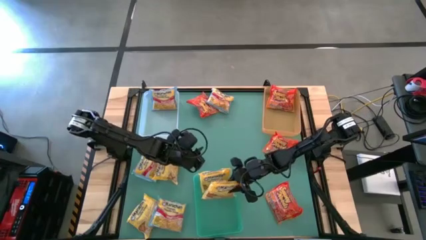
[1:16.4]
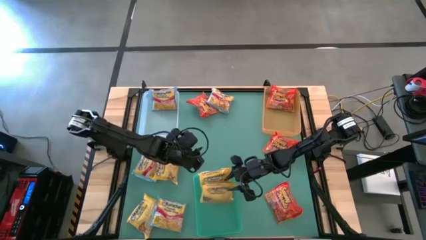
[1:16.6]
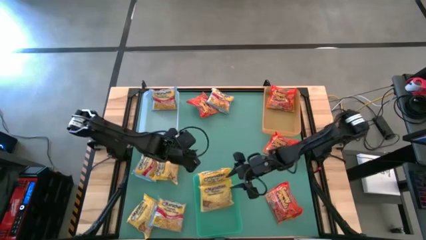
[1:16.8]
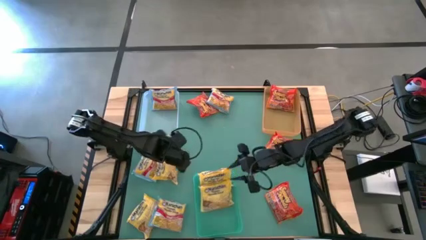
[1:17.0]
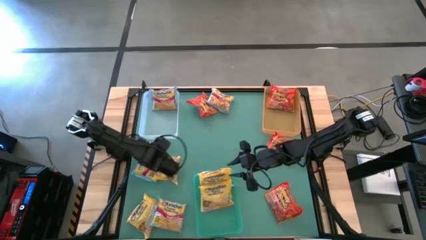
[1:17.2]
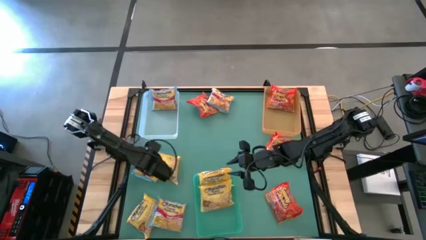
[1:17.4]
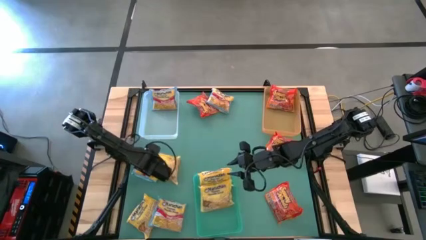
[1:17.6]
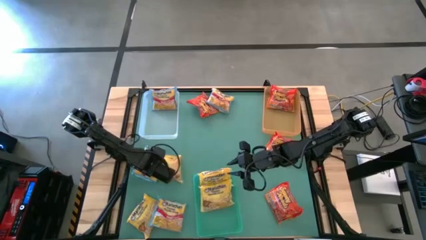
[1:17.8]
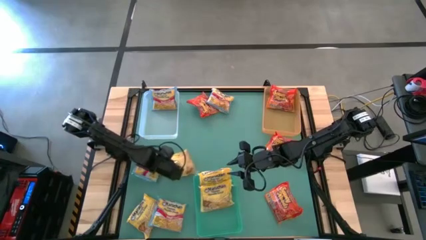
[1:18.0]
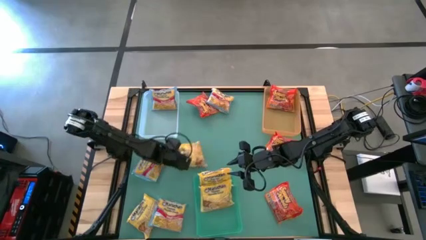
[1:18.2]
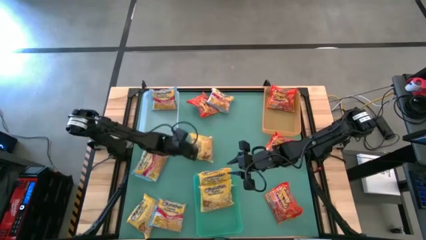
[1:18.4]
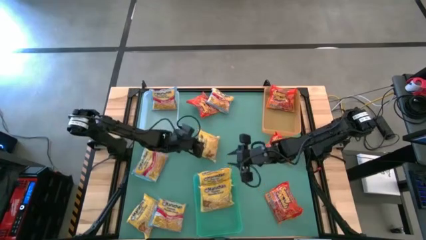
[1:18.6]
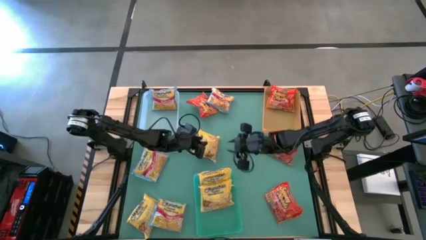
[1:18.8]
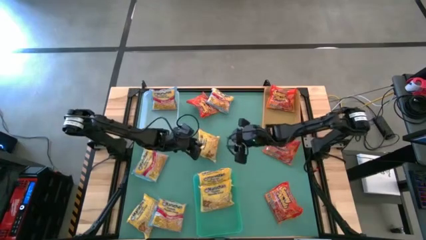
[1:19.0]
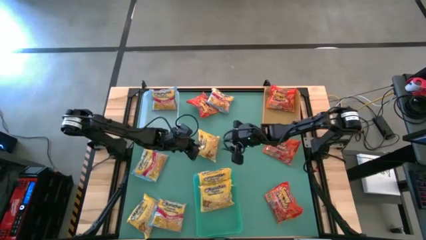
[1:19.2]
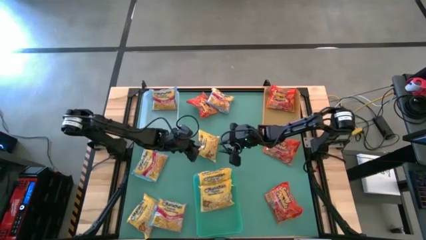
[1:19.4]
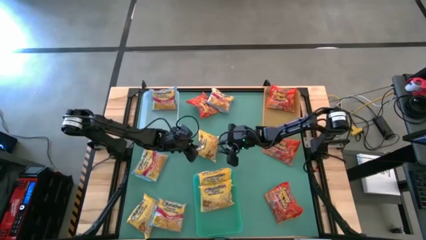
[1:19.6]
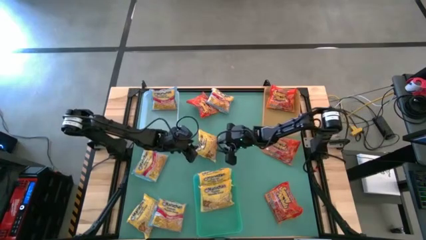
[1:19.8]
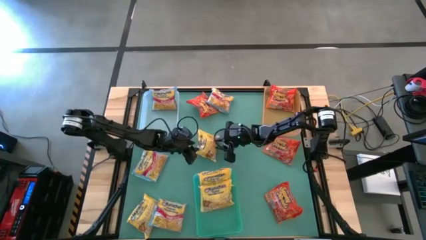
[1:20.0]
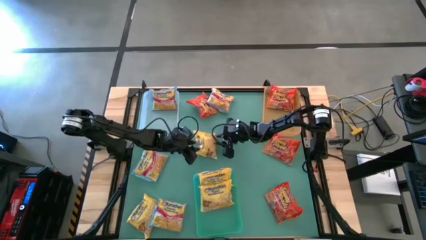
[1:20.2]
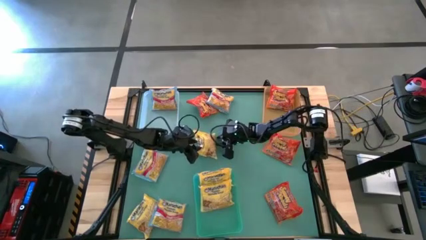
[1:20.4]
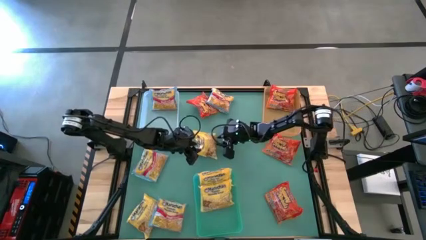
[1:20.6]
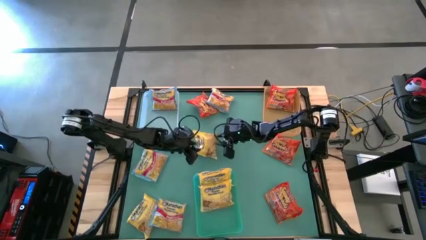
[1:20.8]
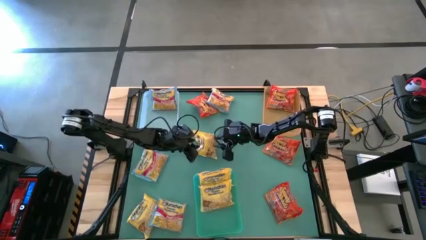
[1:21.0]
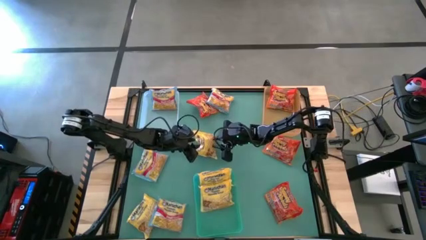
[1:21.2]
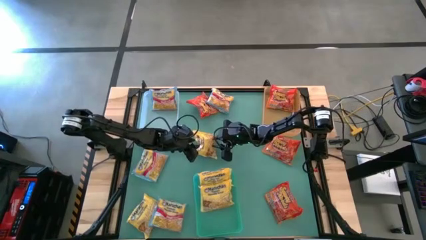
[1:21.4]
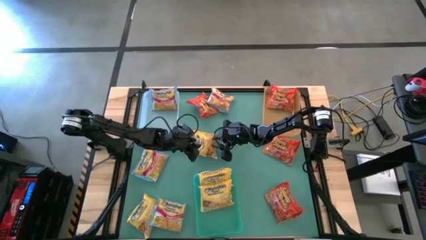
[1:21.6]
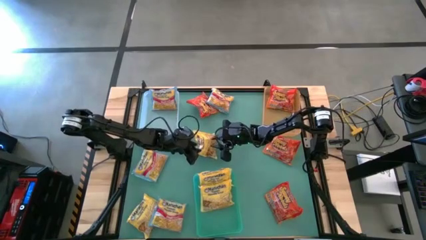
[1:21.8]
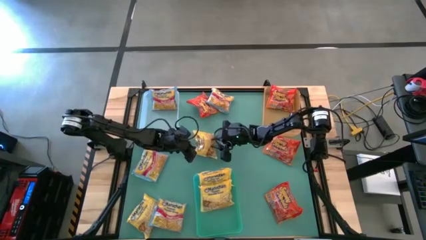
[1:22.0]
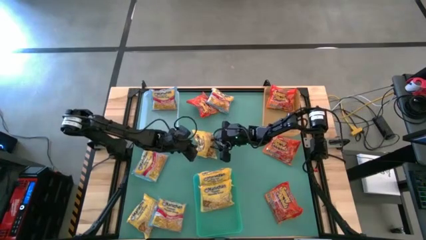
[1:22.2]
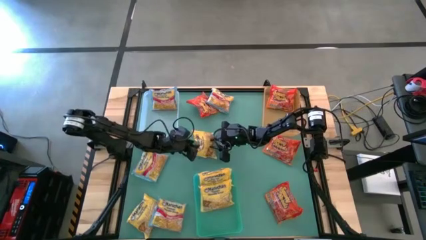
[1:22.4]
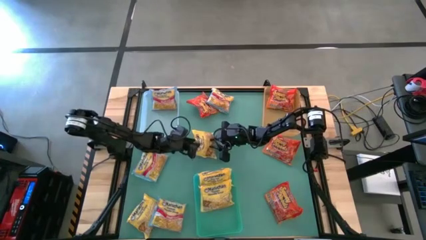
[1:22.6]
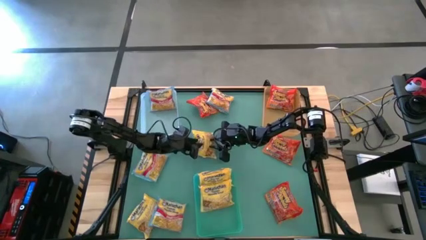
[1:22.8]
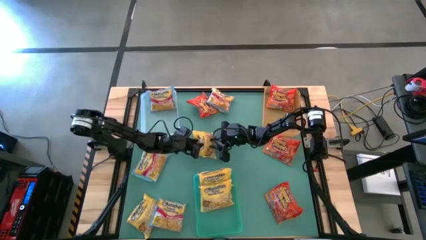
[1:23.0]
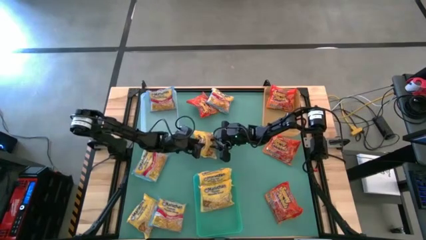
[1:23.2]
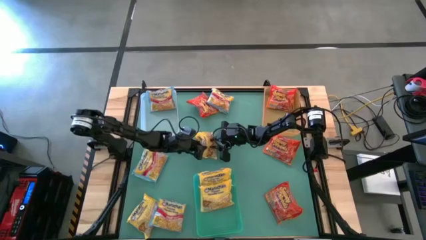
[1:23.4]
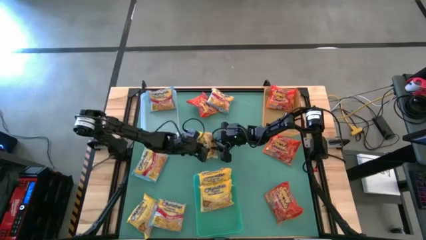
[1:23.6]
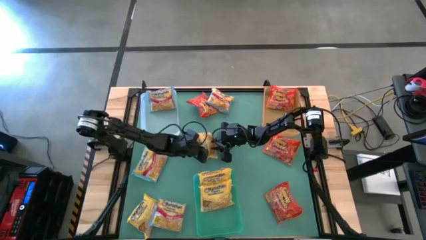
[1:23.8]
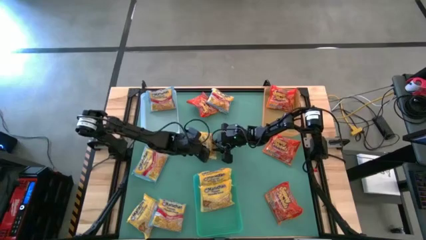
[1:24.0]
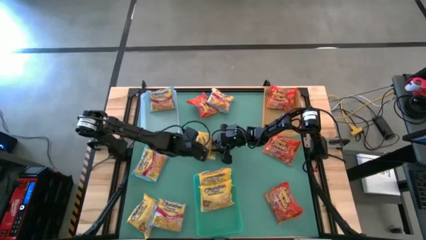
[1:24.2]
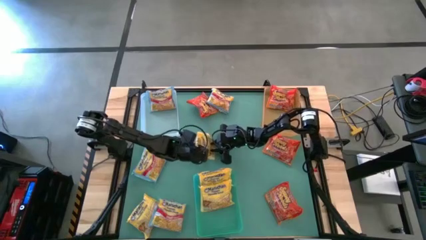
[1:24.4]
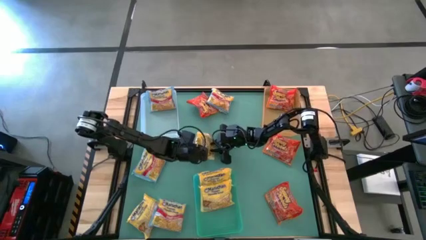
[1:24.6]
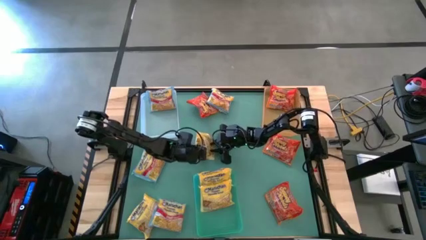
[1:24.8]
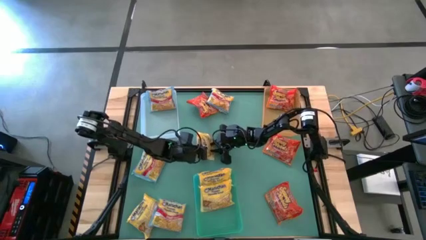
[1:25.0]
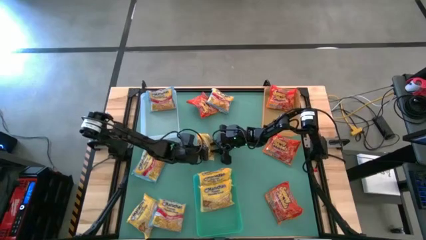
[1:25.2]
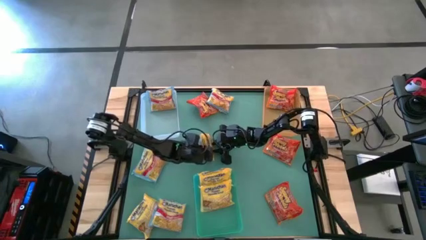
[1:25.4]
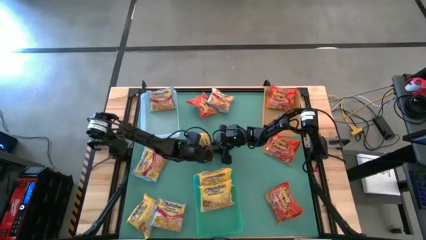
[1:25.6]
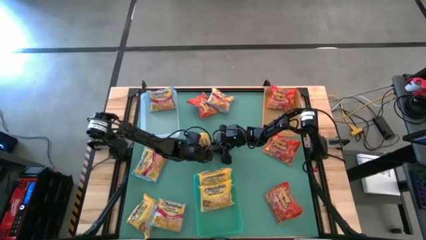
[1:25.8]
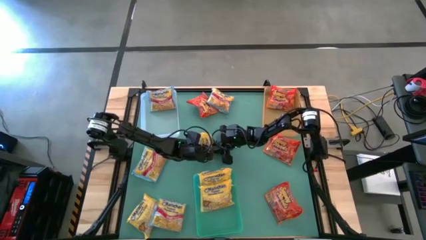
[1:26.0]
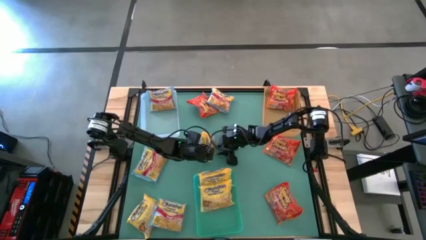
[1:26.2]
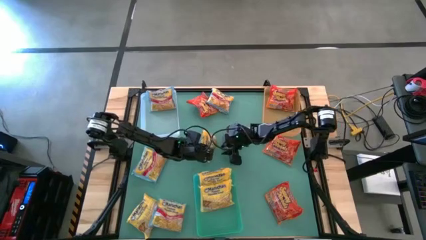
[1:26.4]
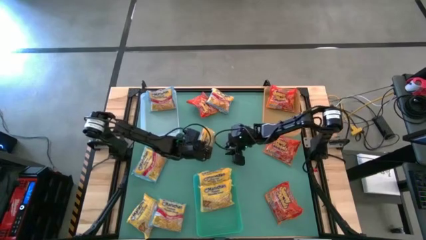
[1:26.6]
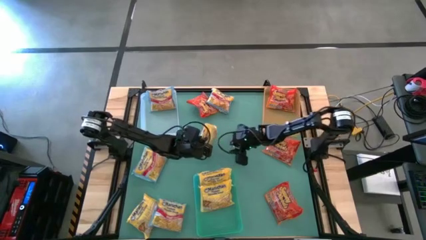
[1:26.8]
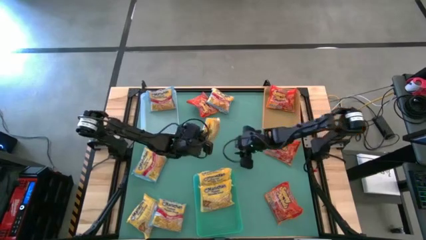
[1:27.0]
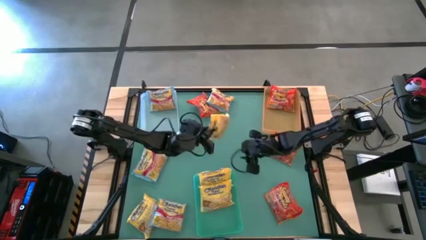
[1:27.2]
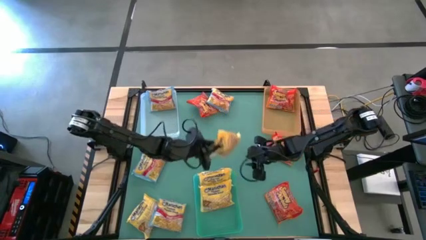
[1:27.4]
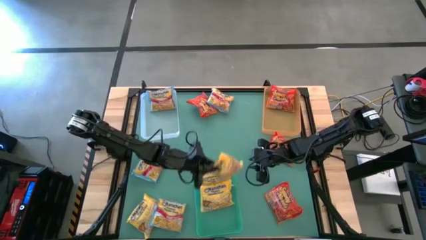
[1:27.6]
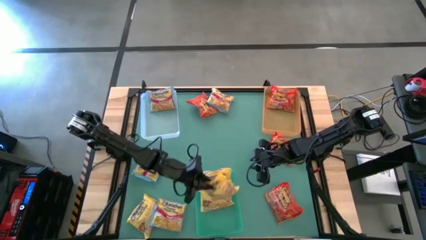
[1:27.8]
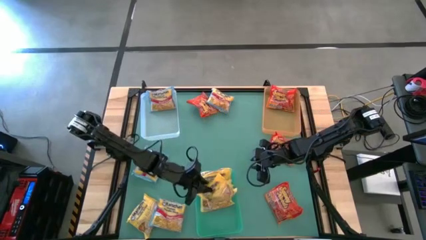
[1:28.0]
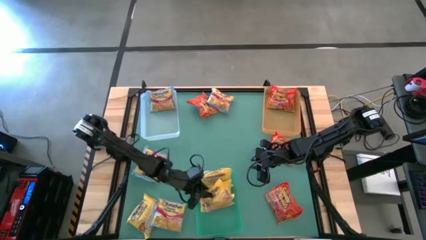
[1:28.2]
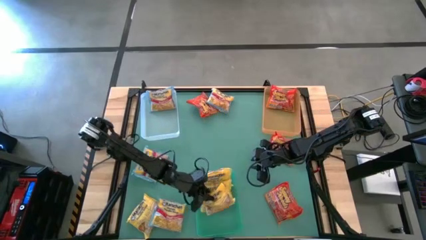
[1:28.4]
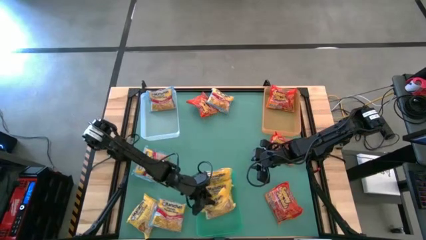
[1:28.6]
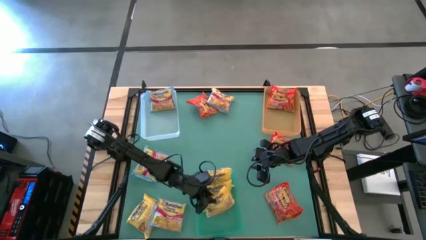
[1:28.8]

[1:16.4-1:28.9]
Task: Sort Maruchan noodles
Put the top yellow noodle pack into the green bin
